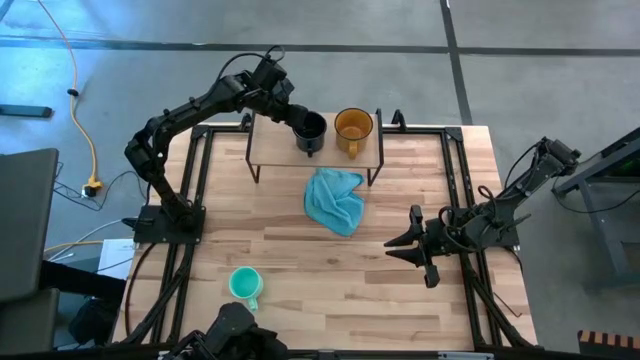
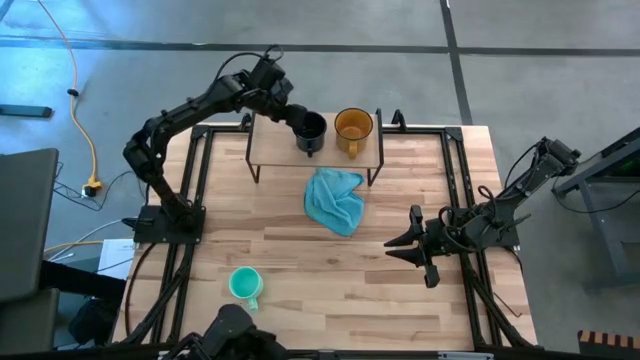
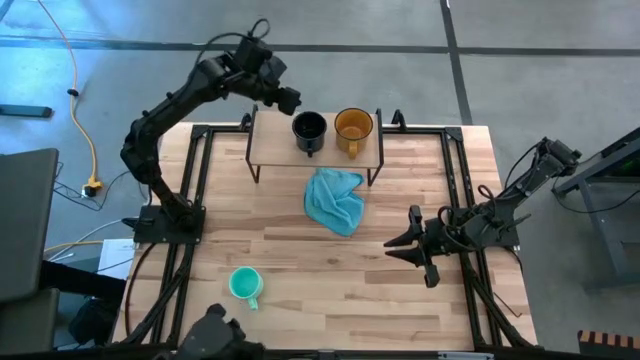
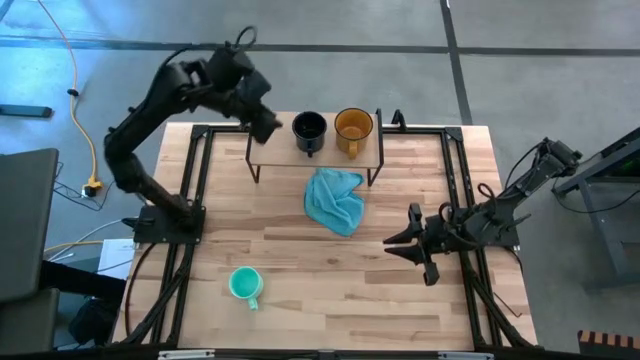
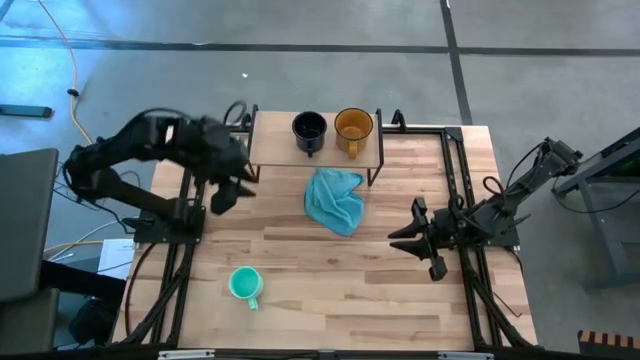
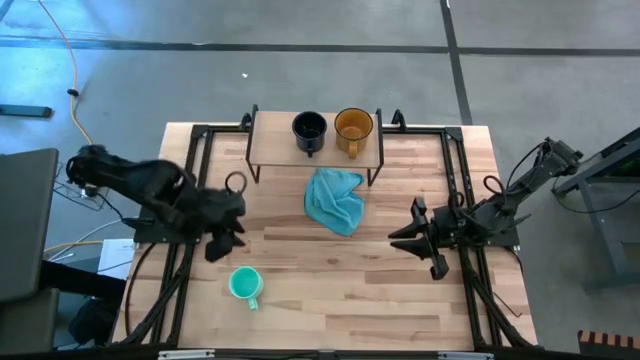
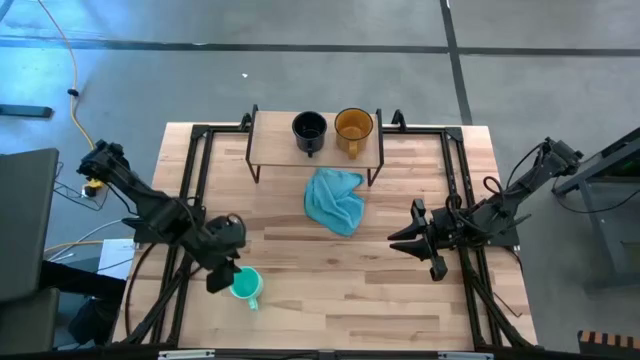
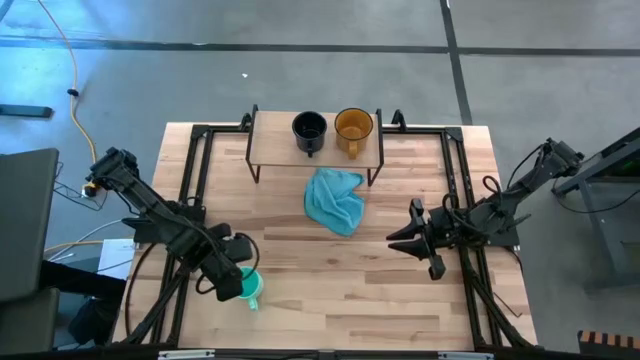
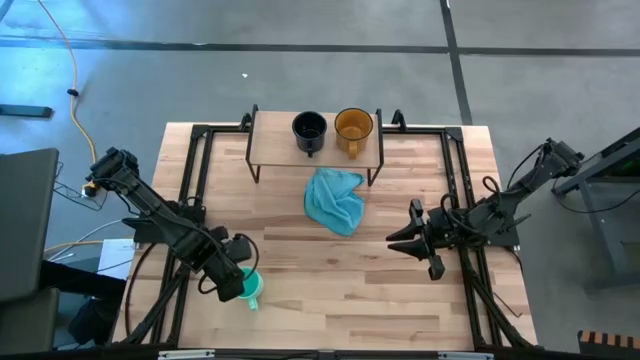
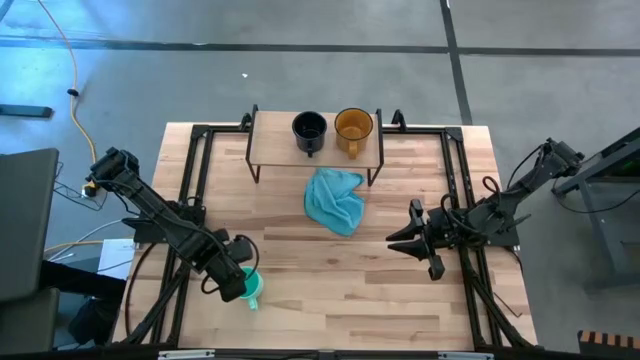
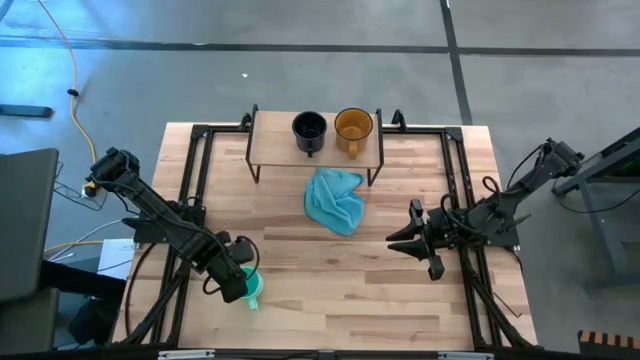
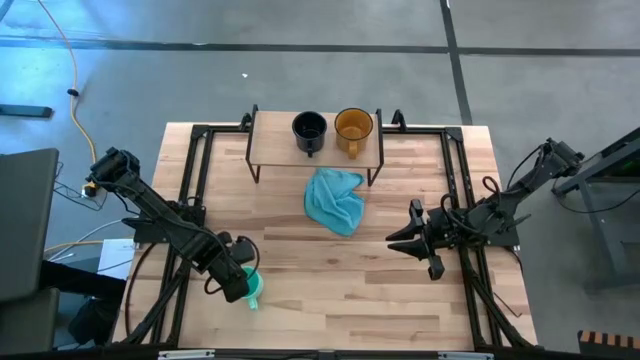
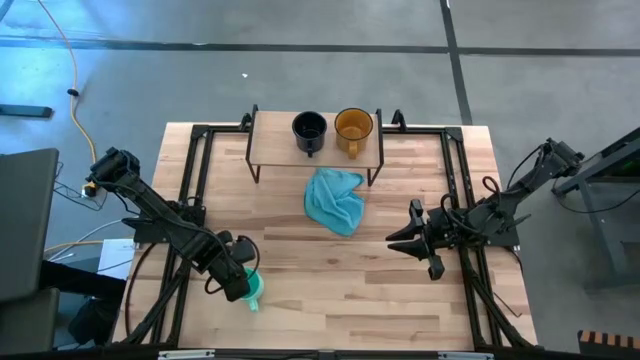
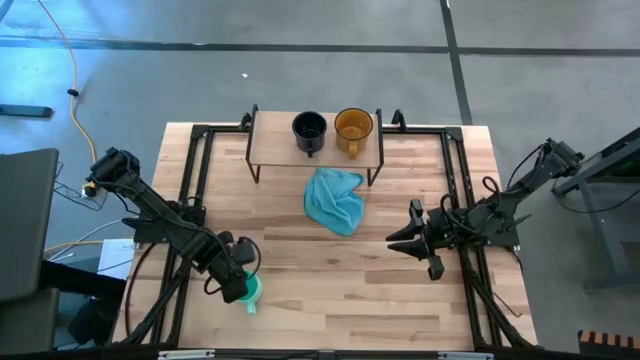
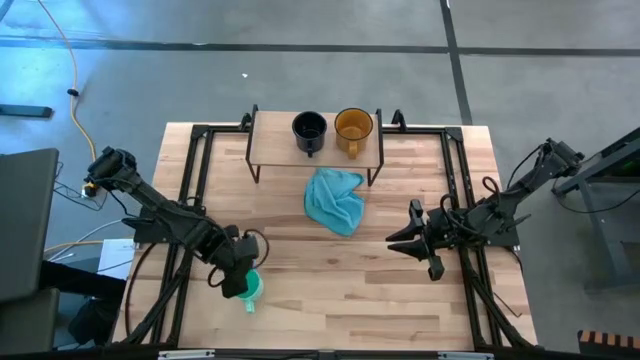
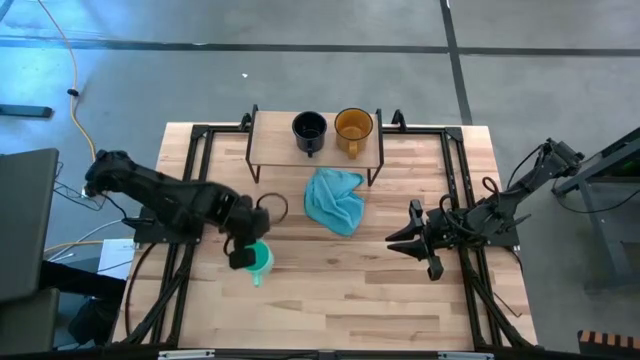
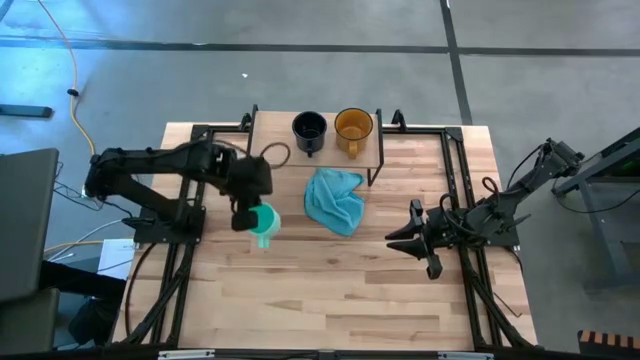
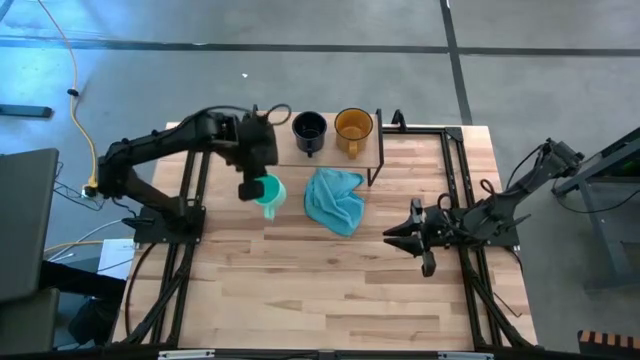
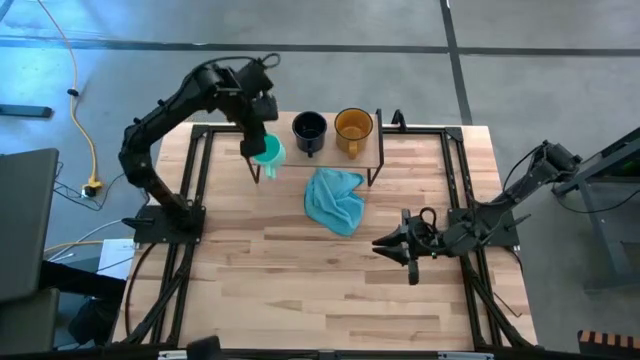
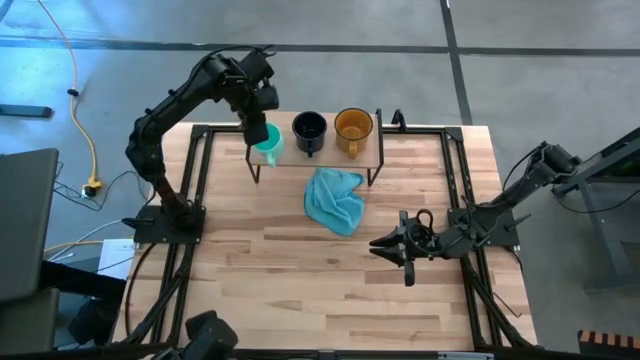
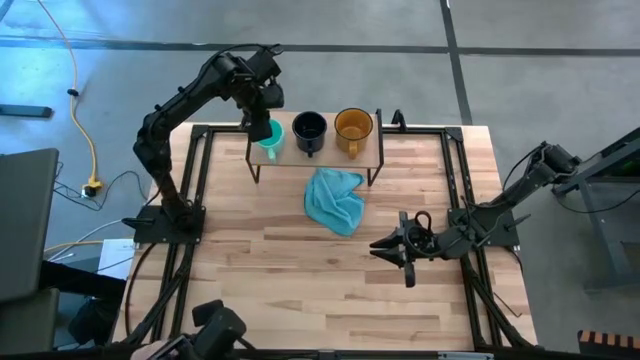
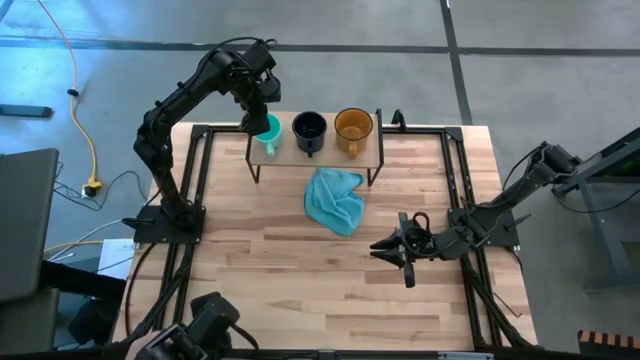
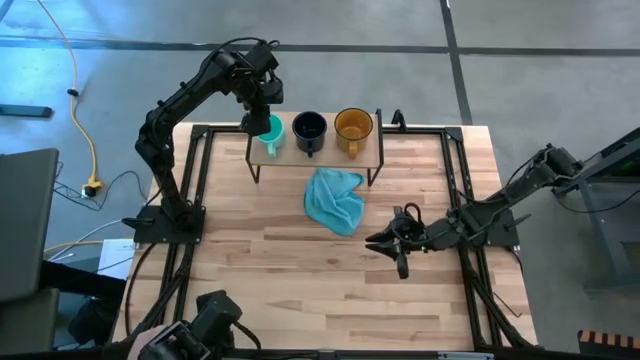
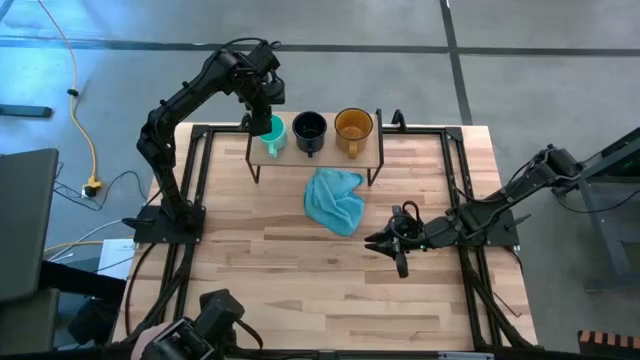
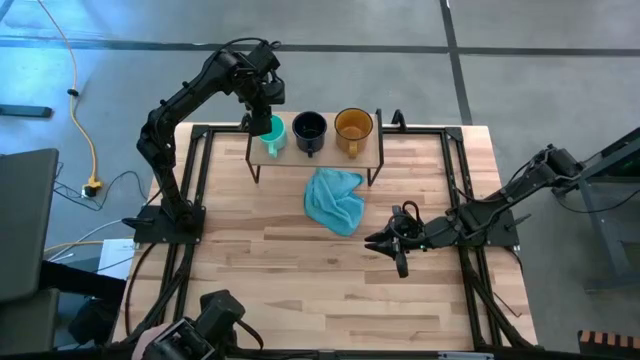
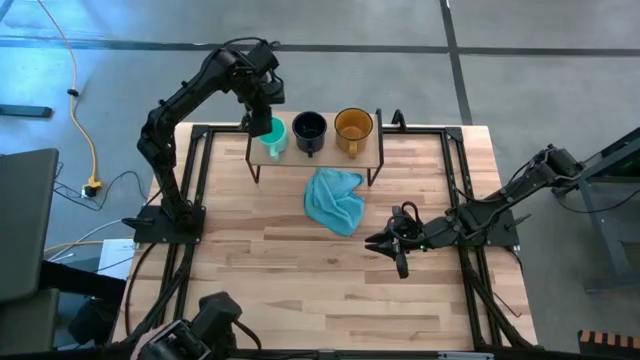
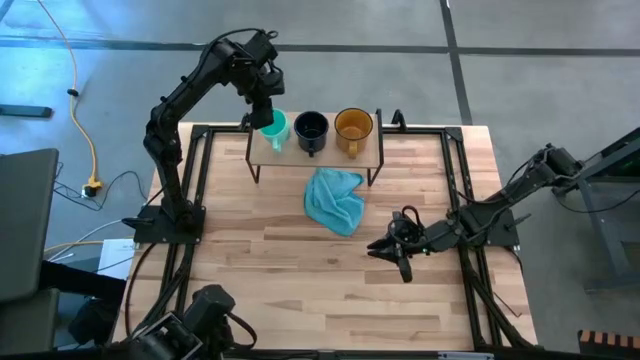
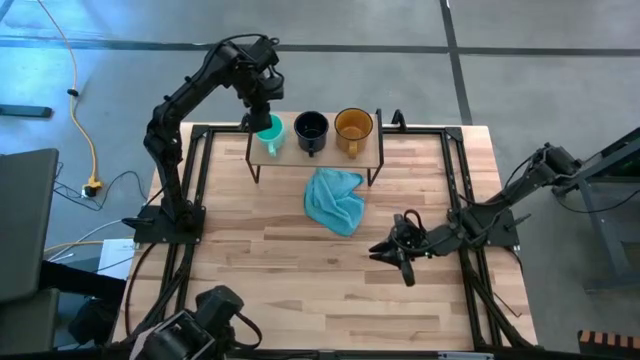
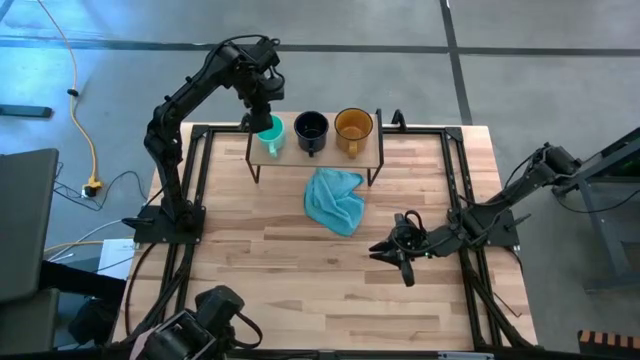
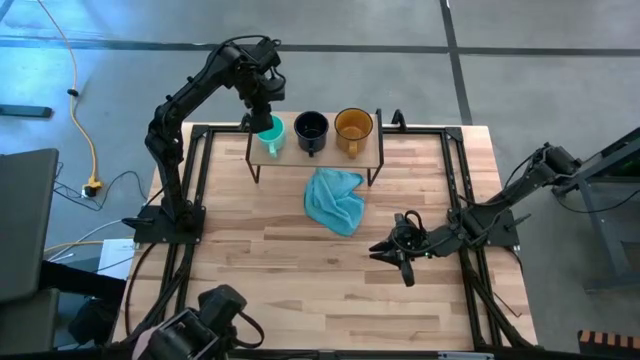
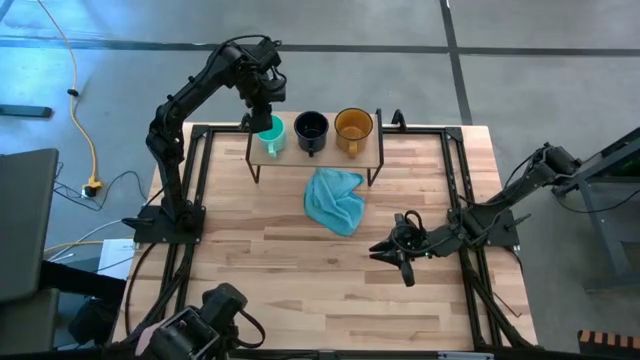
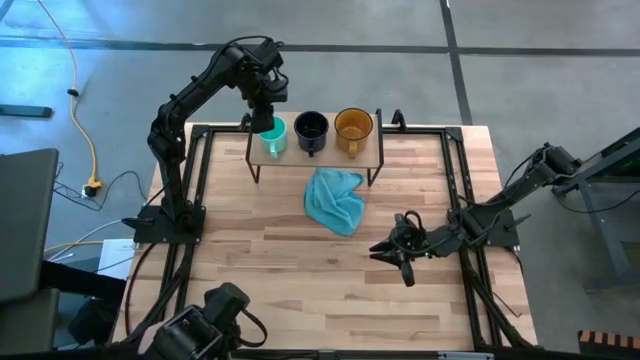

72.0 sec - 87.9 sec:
Task: Stack small to large cups/mugs on shelf
Put the light blue mug on the shelf

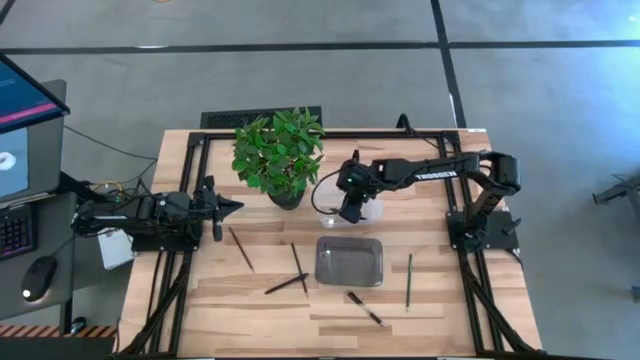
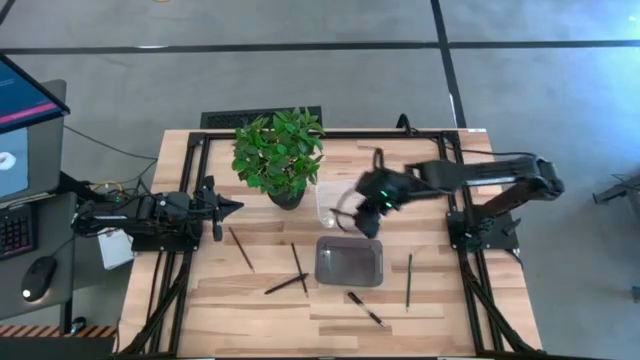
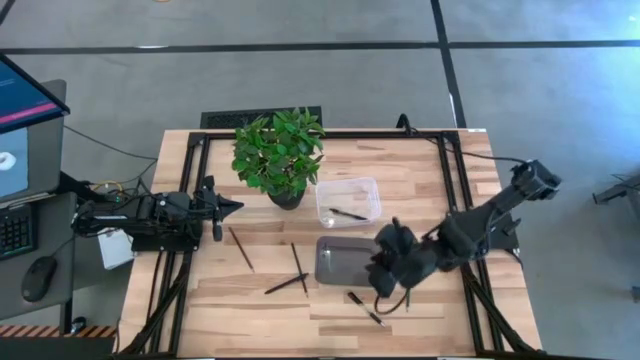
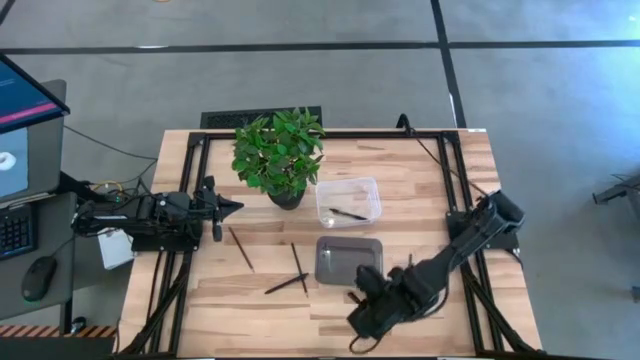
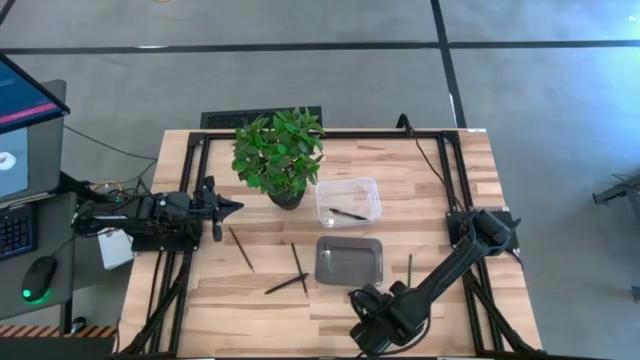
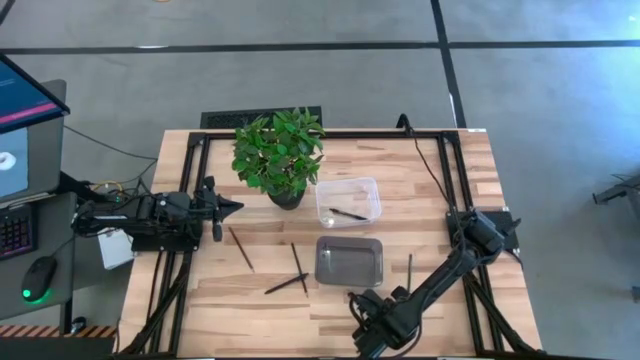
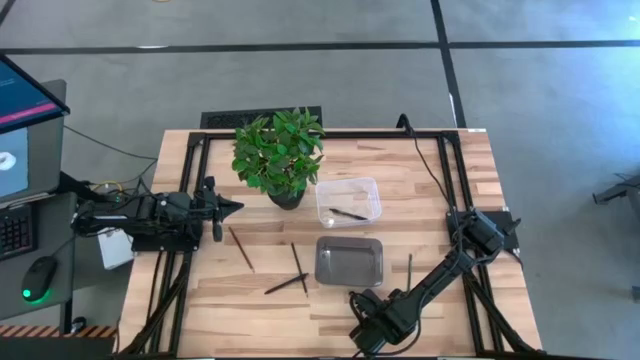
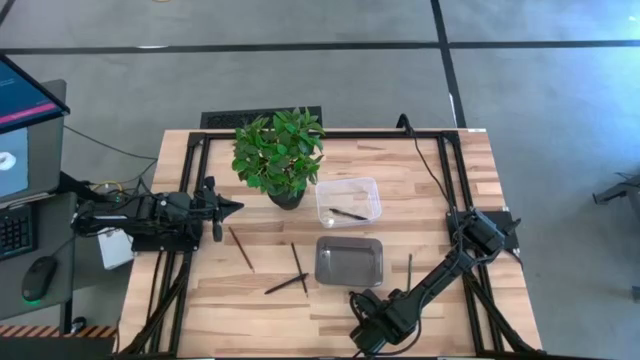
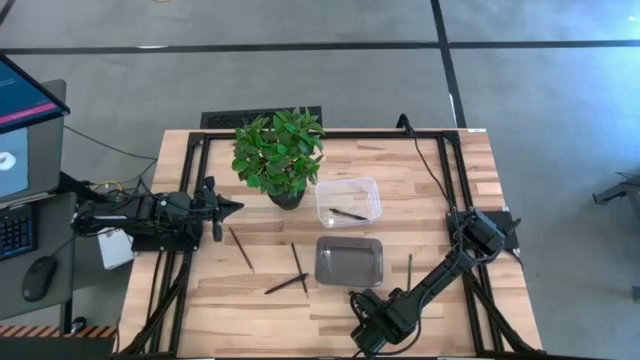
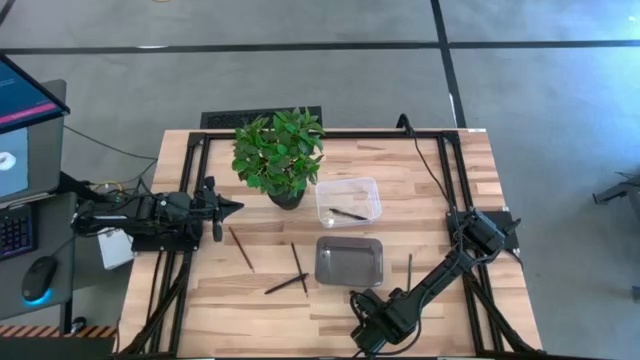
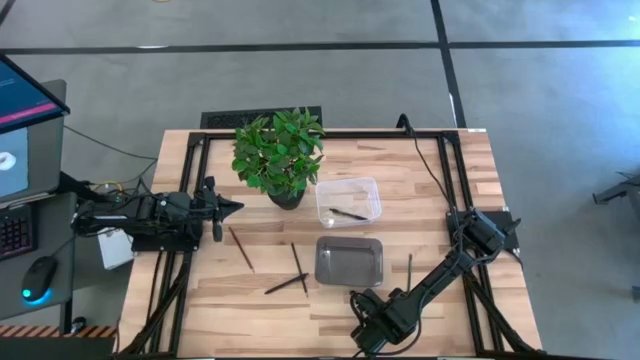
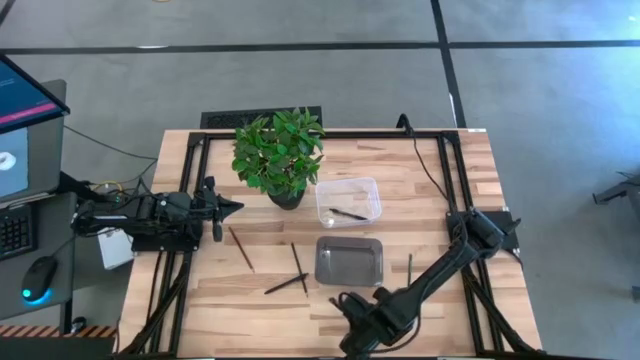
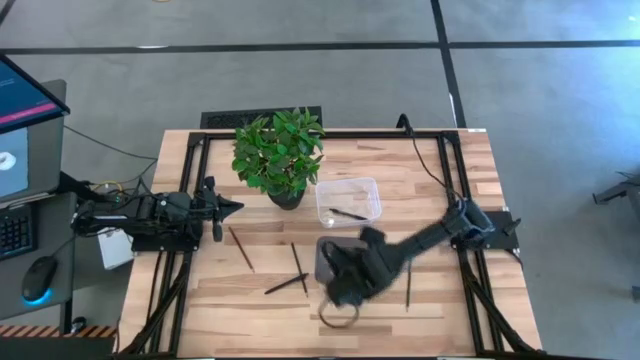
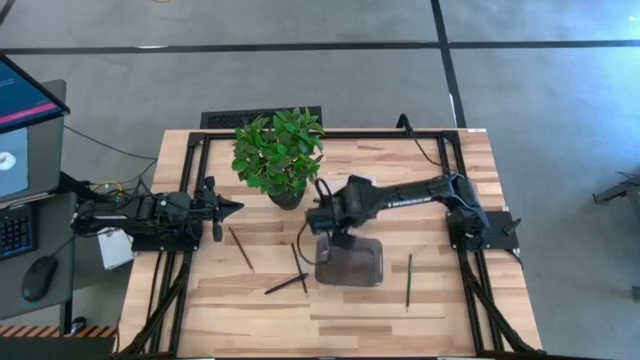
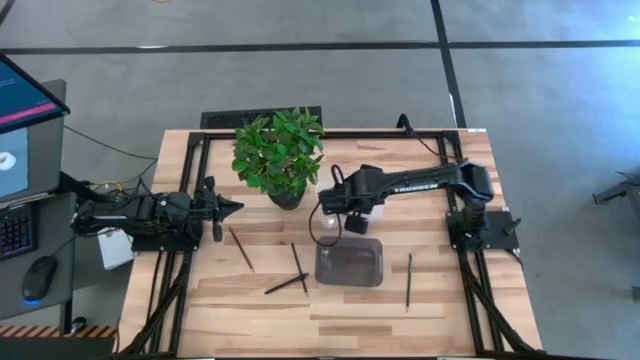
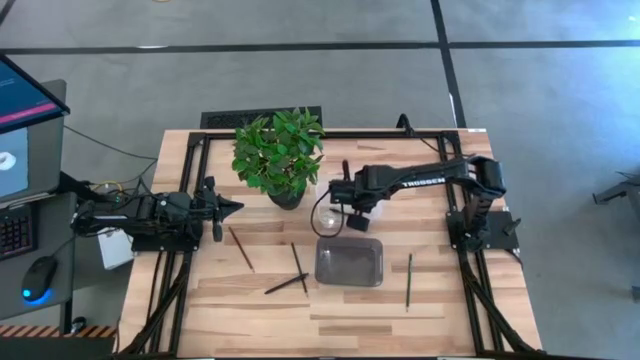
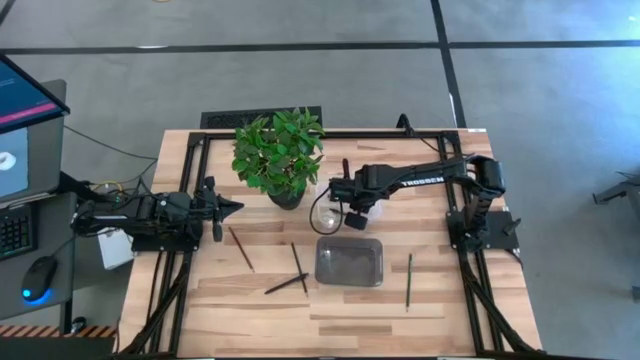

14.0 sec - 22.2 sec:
Task: Sort pens & pencils
Put the bottom black pen into the transparent bin
